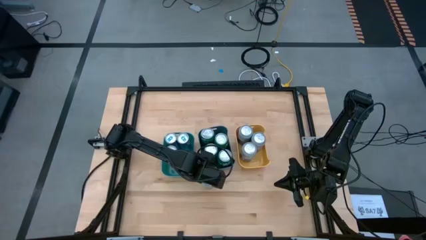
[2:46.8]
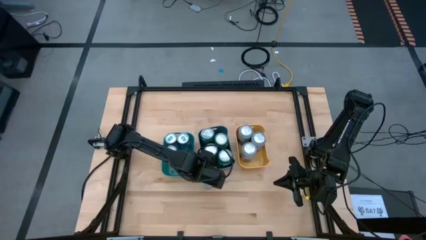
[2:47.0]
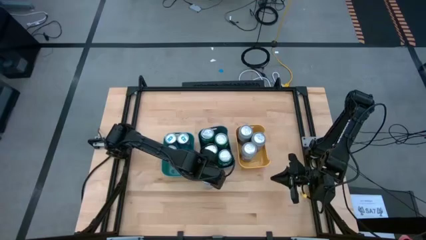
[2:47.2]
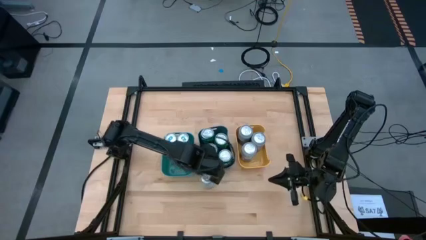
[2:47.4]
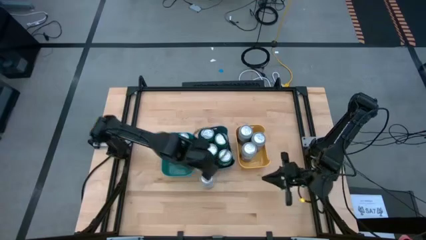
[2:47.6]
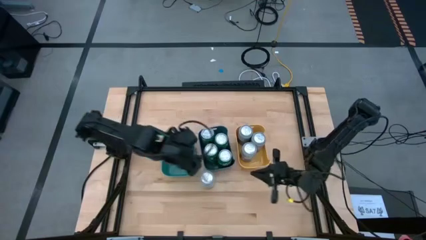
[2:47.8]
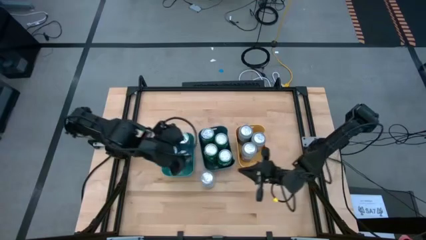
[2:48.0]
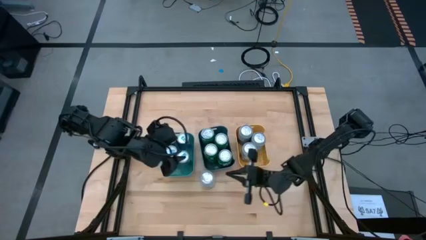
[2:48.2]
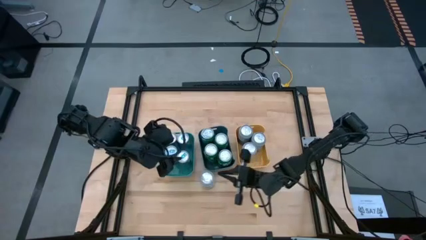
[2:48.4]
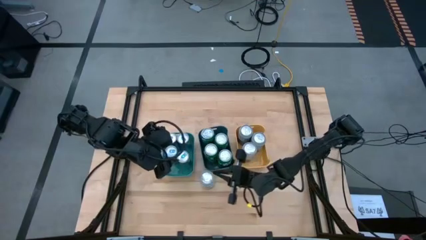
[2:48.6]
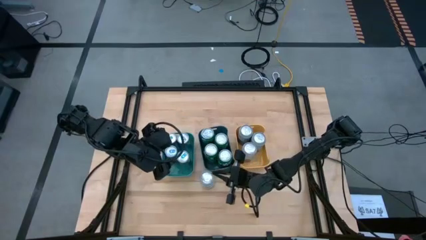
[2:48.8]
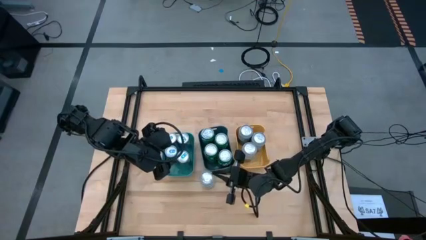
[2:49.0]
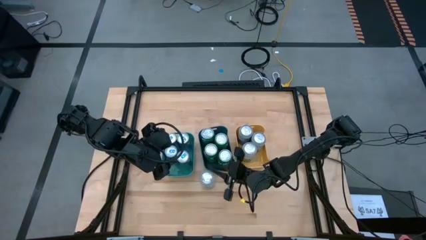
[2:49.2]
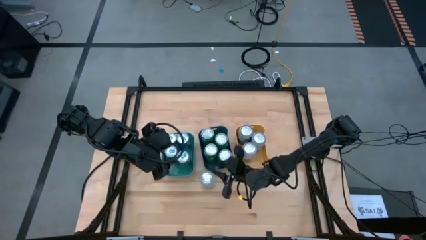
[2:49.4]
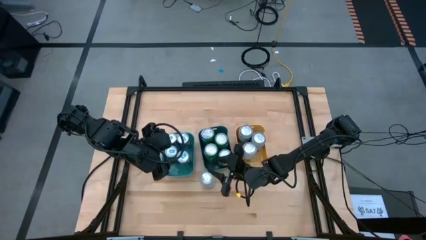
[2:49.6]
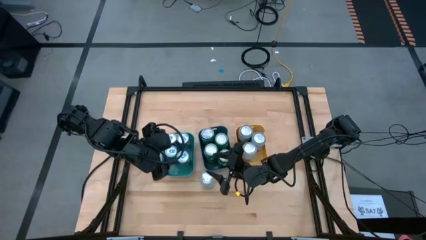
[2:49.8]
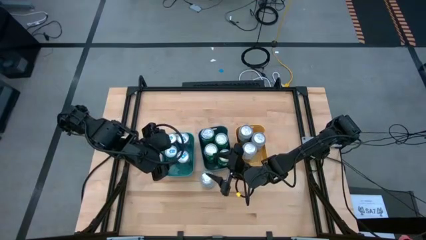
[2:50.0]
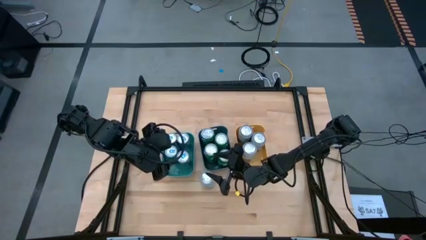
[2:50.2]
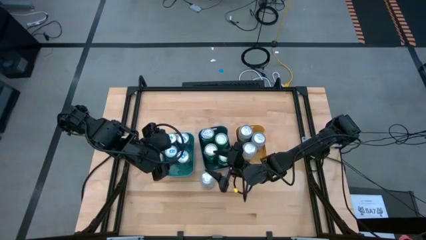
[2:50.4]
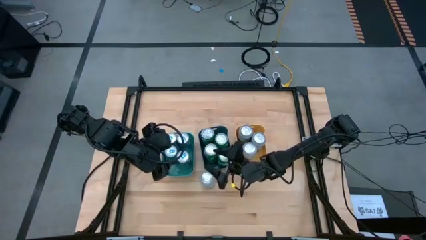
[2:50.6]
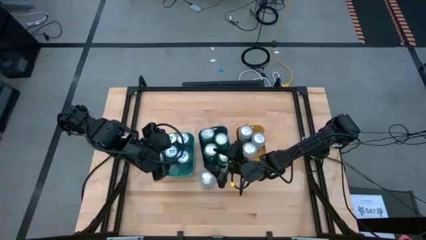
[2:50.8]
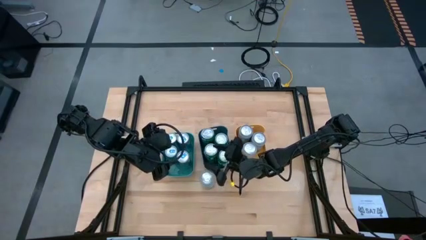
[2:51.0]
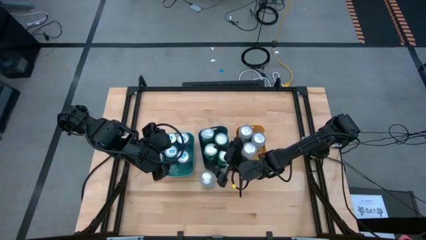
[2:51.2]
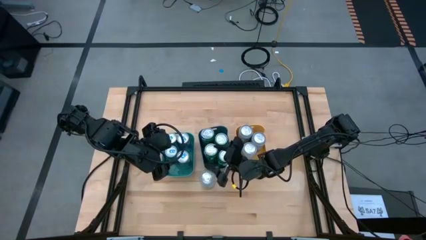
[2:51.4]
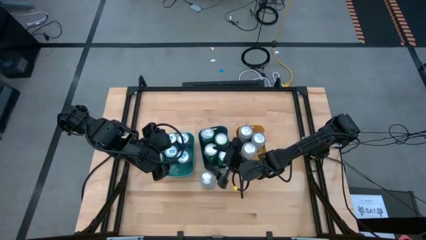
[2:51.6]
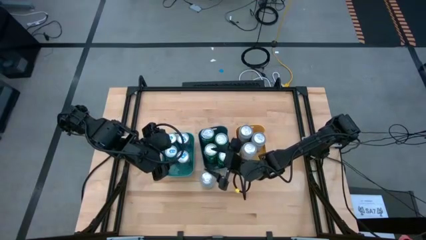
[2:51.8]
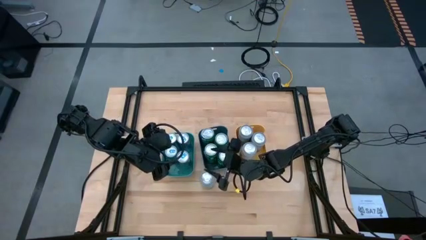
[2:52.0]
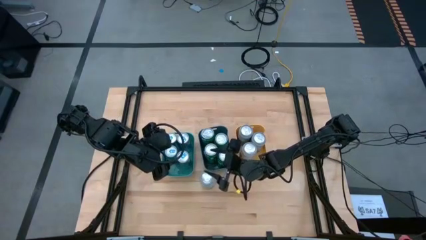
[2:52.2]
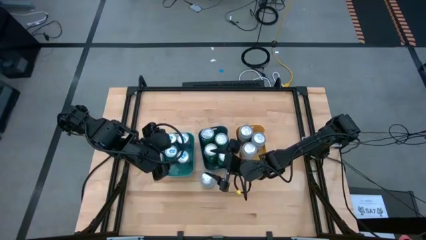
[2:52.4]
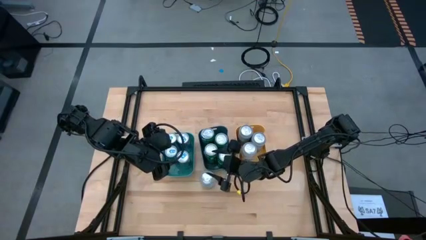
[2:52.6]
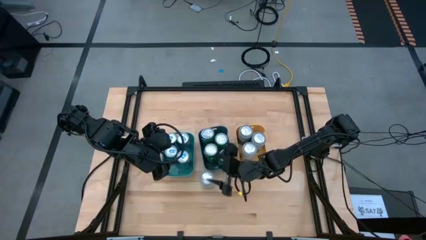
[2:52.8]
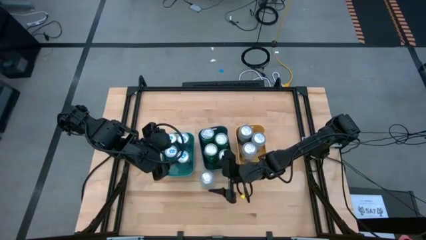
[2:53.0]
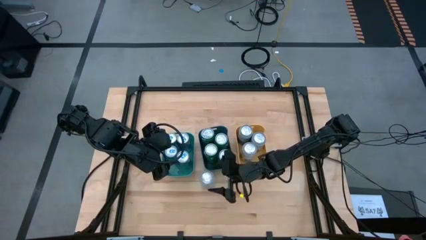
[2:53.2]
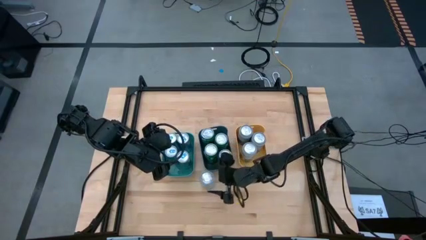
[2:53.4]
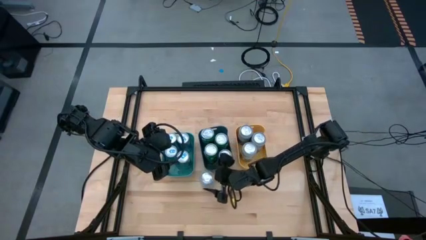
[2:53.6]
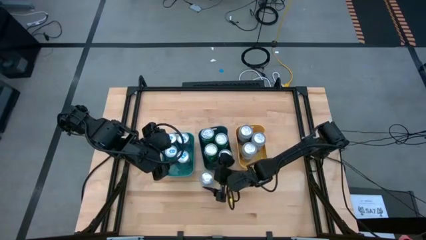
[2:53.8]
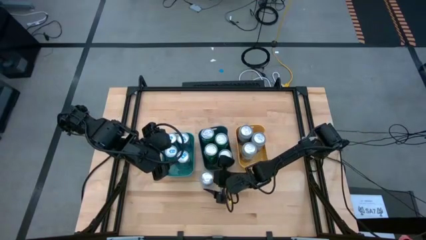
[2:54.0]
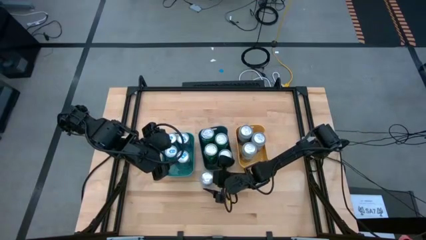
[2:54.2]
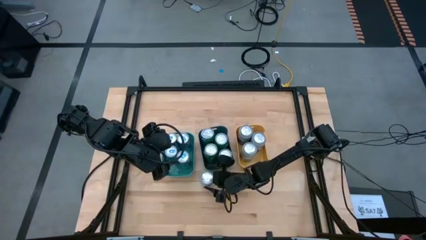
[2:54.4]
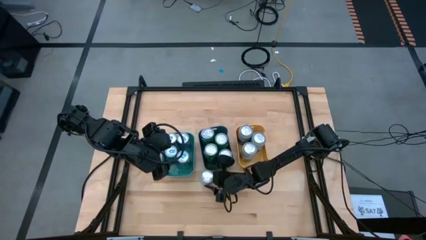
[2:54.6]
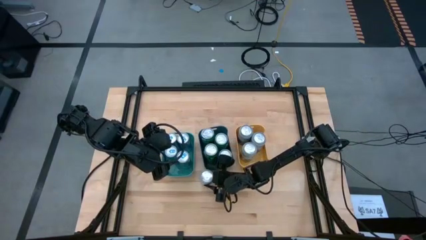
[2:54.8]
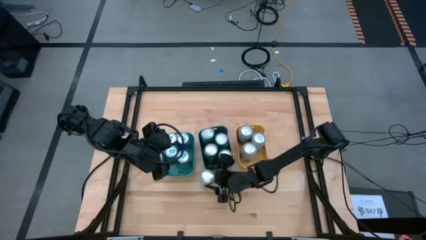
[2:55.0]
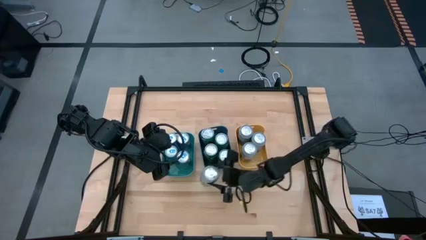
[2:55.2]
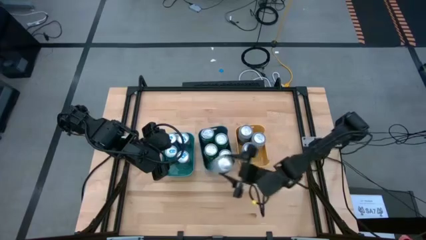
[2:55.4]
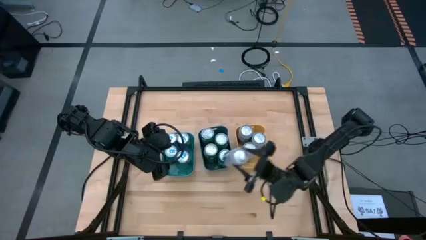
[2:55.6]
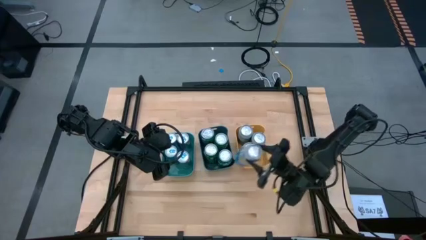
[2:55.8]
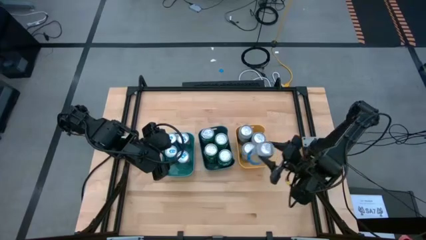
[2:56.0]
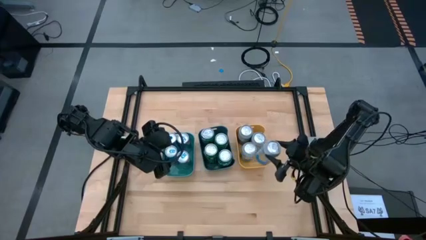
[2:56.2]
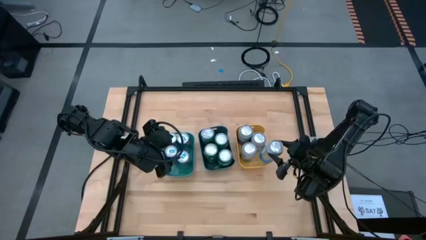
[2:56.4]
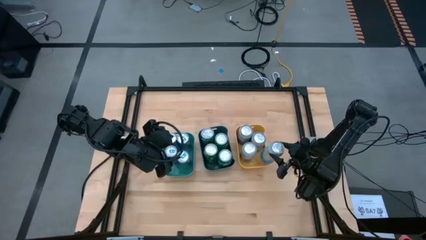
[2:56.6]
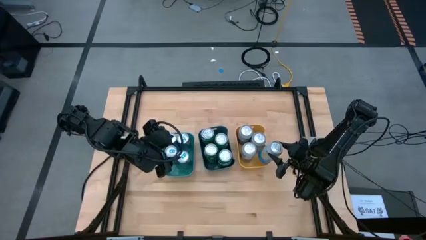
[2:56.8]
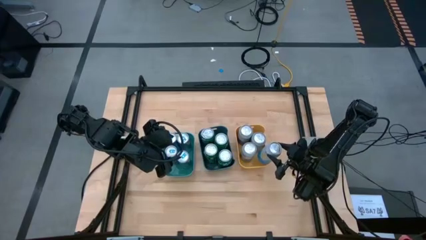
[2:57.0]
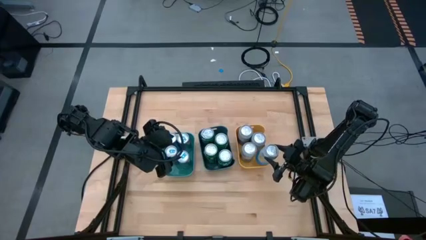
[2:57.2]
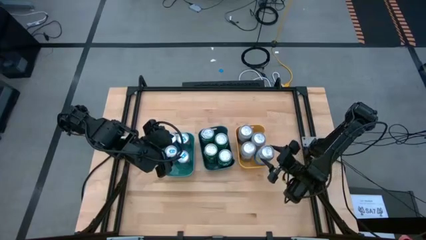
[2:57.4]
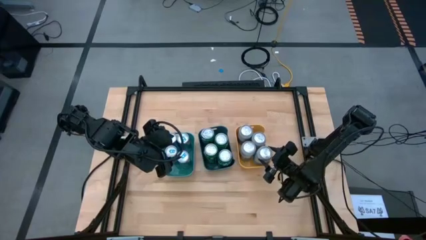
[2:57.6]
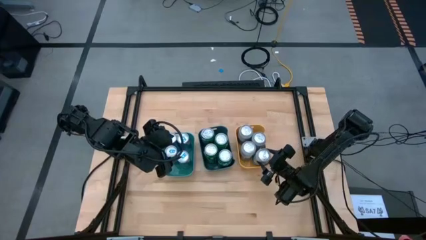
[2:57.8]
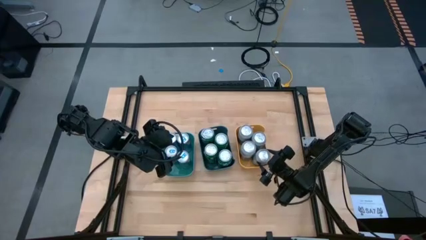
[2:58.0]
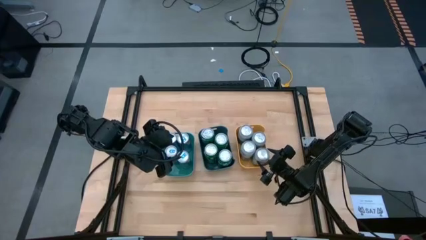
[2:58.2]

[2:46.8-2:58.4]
Task: Sort soda cans
Put the blue/white soda can into the yellow bin

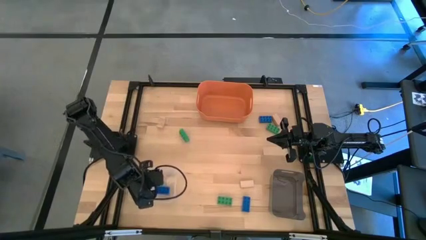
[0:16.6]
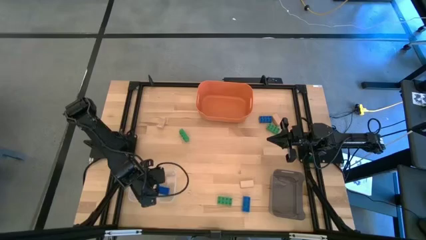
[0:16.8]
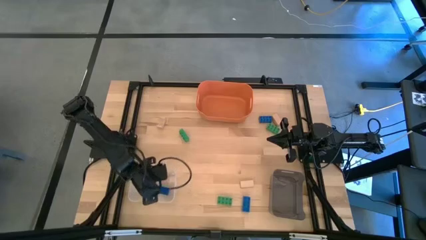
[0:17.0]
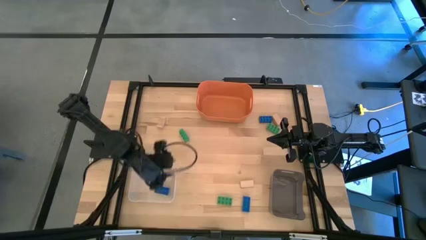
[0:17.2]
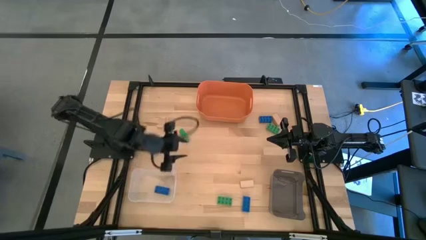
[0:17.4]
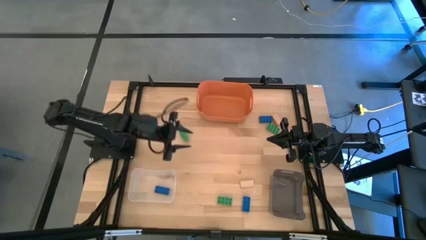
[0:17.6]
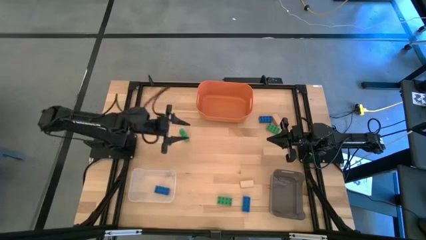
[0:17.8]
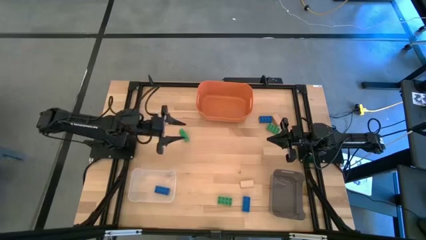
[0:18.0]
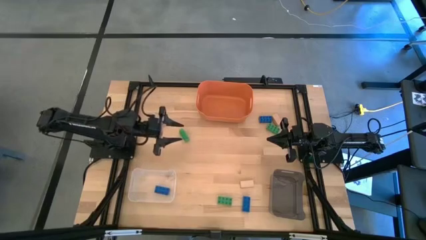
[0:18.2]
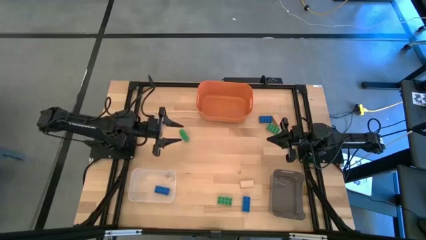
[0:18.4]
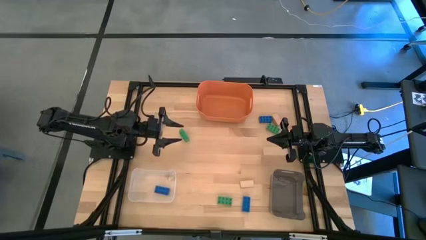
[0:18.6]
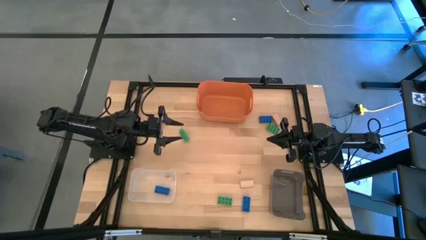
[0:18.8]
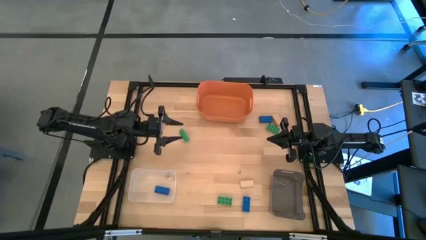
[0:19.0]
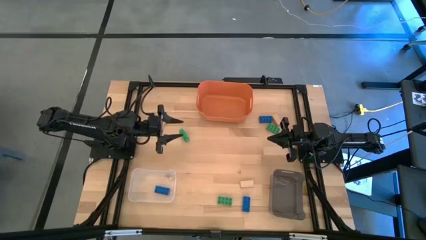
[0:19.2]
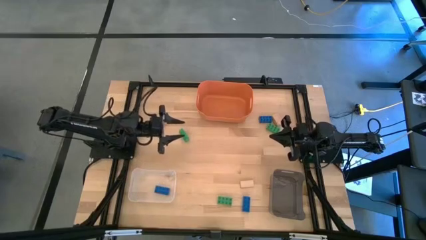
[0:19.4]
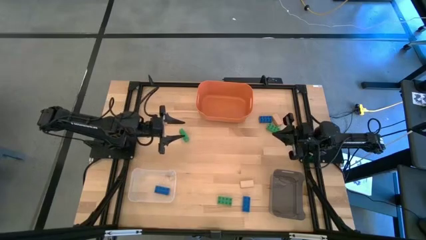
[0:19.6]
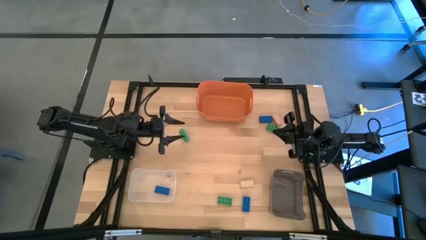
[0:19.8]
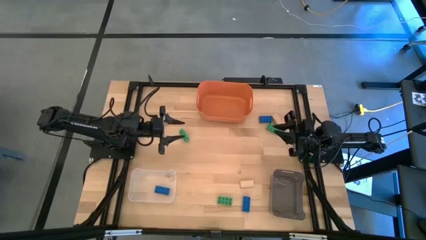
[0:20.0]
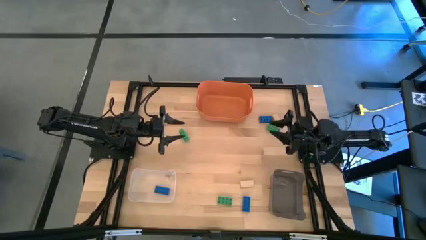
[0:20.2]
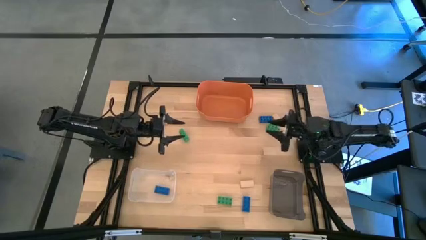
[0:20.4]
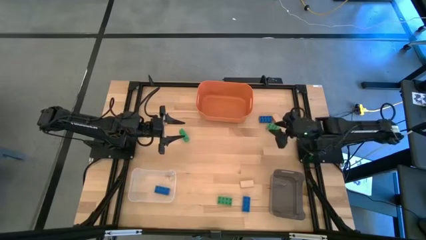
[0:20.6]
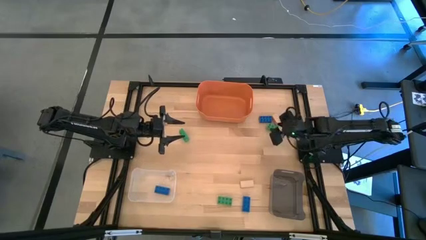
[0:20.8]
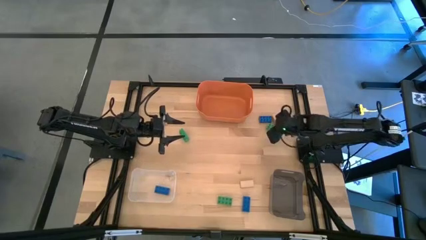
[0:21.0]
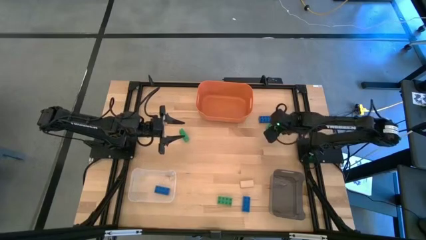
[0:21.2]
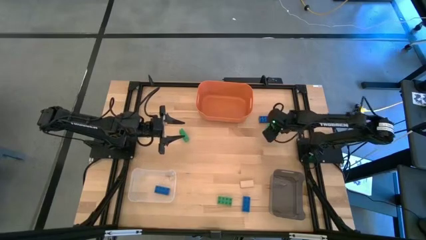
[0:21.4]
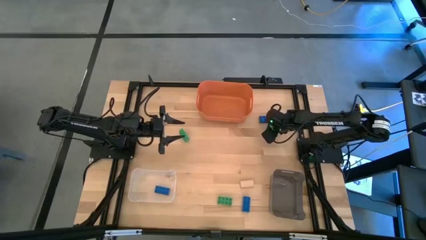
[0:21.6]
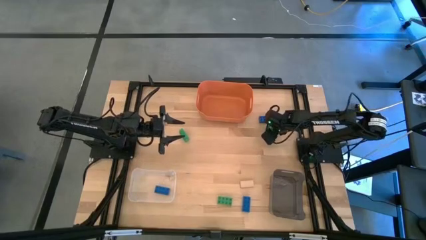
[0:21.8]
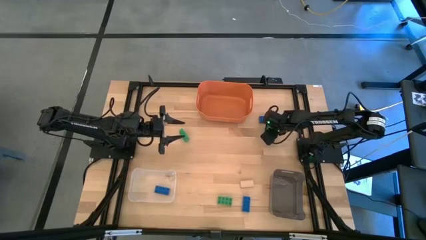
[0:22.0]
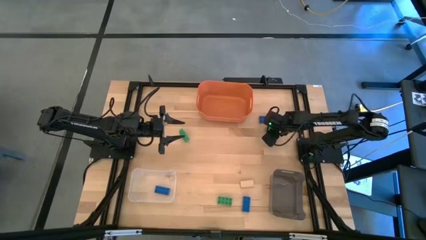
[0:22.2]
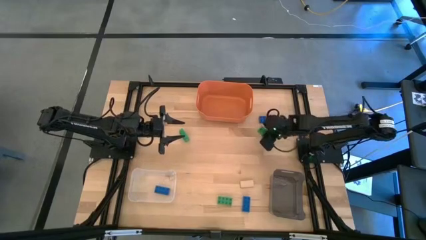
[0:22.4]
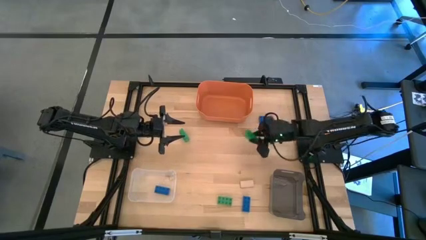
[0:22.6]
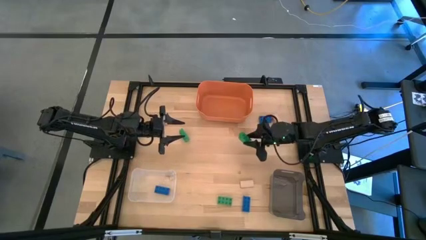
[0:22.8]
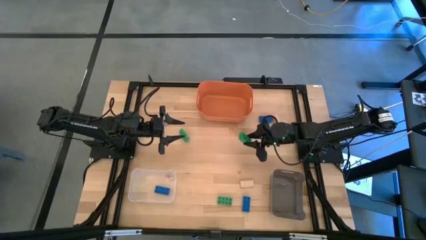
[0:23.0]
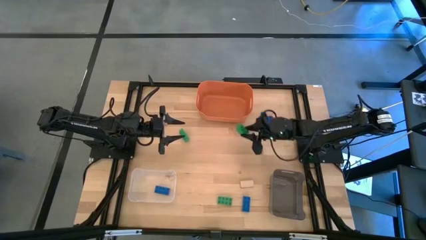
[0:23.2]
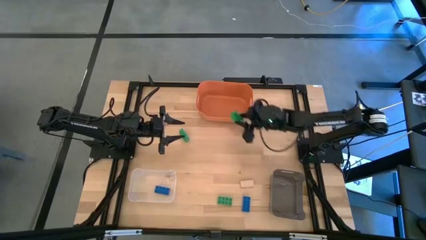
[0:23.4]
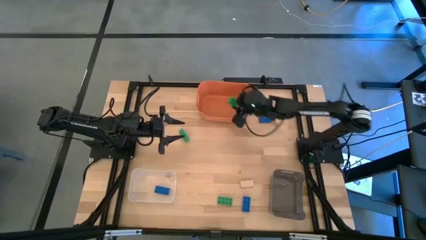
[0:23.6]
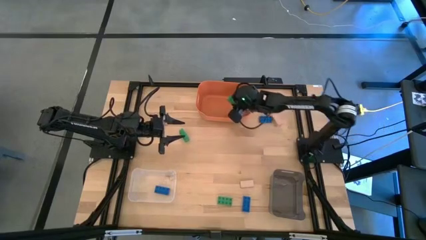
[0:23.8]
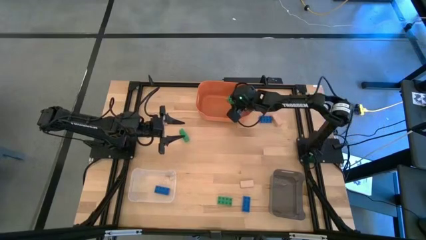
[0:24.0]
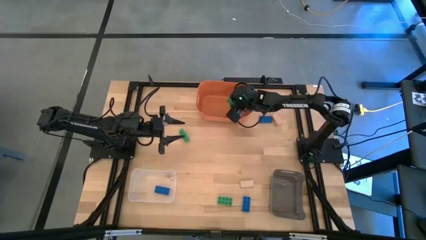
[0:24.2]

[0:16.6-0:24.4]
Task: Sort & place blocks by color
Put the top right 8 stud green game piece into the orange bin
